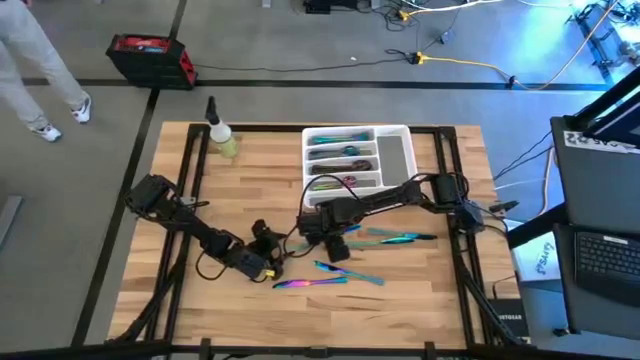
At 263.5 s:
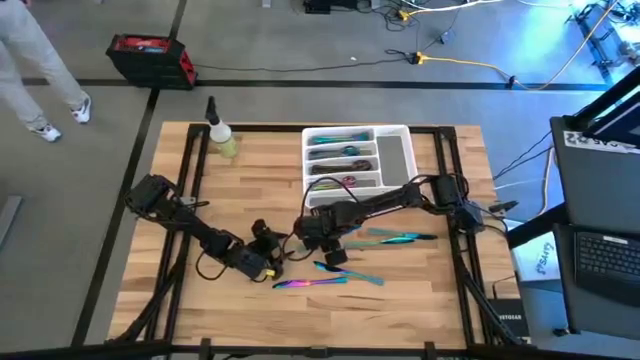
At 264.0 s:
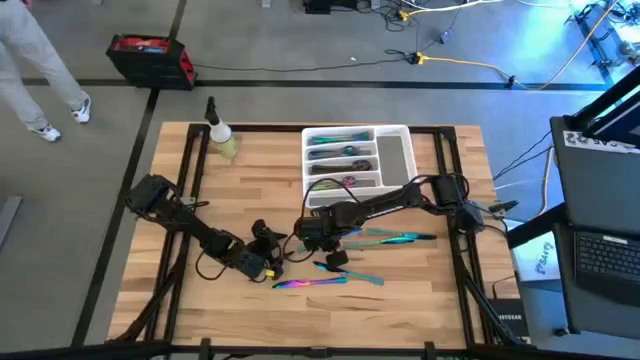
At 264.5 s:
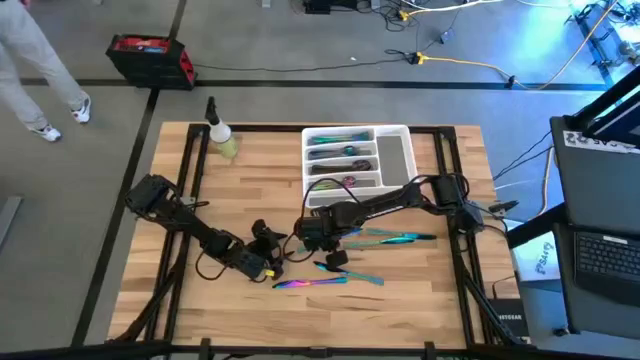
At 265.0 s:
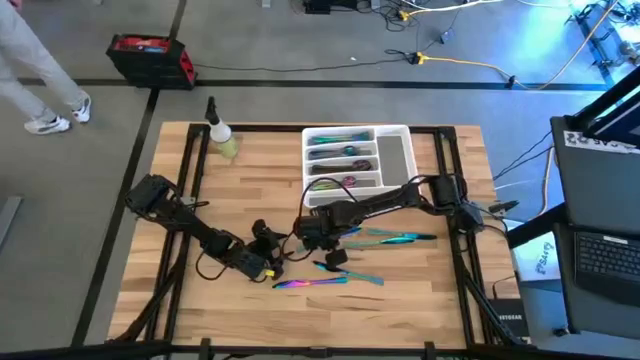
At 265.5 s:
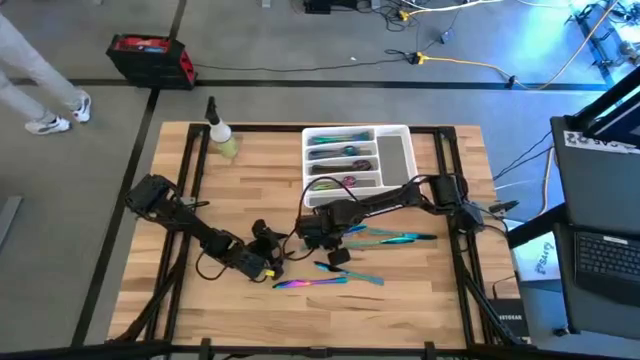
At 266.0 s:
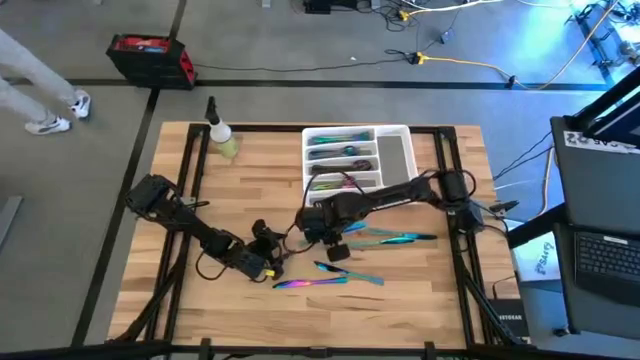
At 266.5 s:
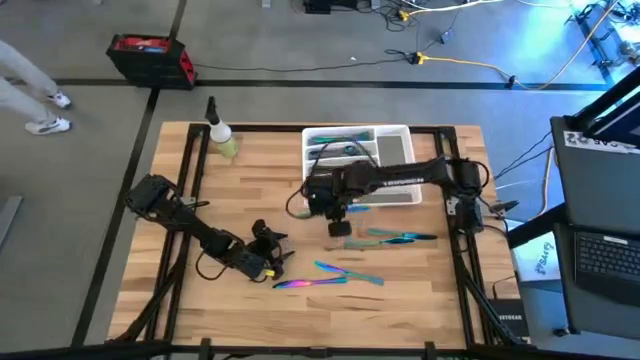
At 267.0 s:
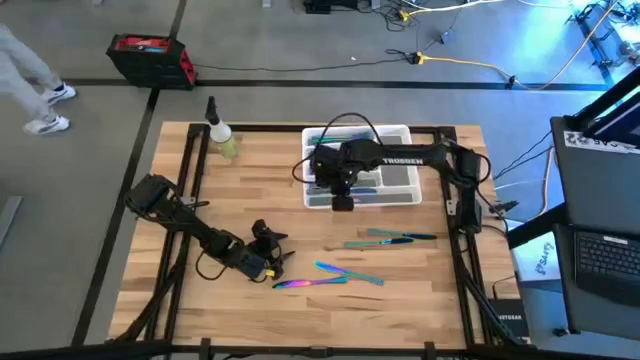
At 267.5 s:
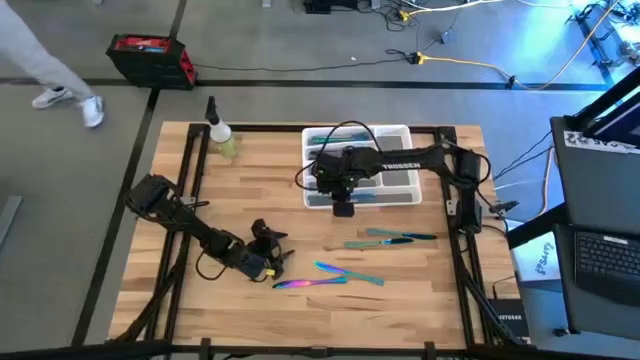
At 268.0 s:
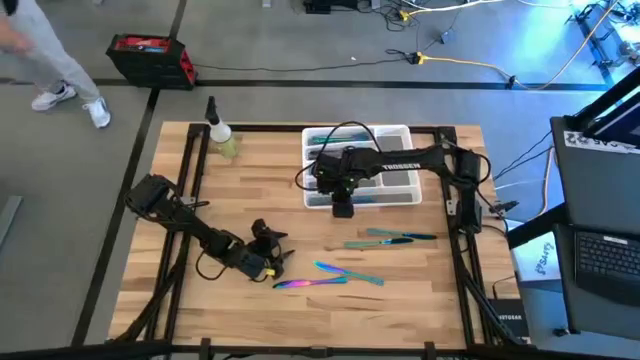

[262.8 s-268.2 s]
Task: Sort silverware
Put the blue knife on the white silverware tray

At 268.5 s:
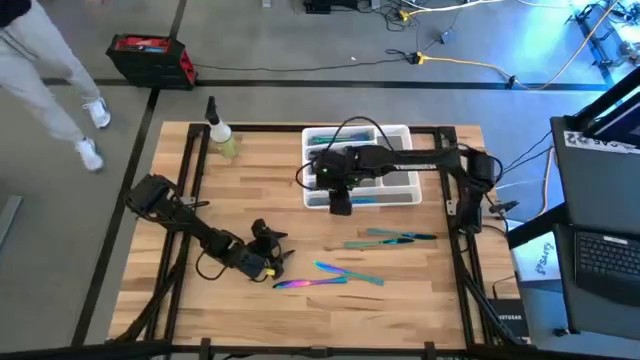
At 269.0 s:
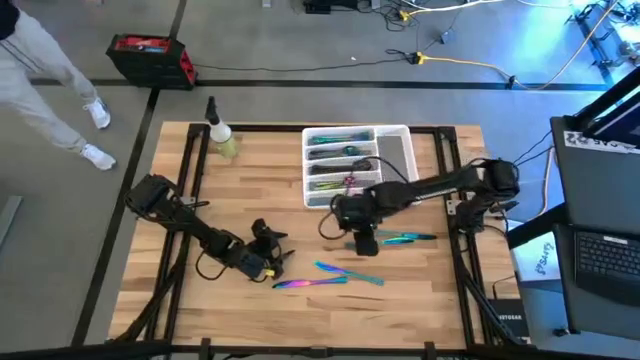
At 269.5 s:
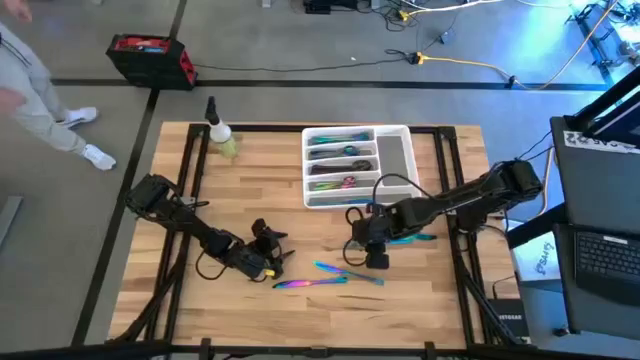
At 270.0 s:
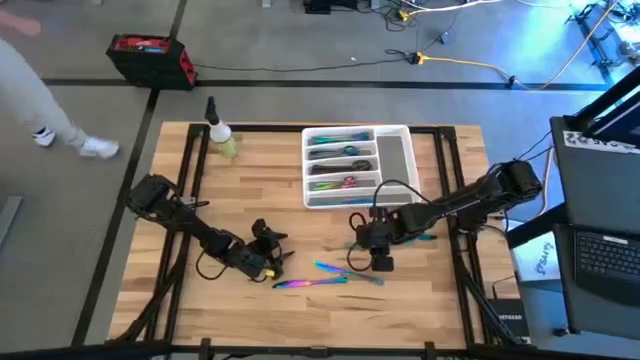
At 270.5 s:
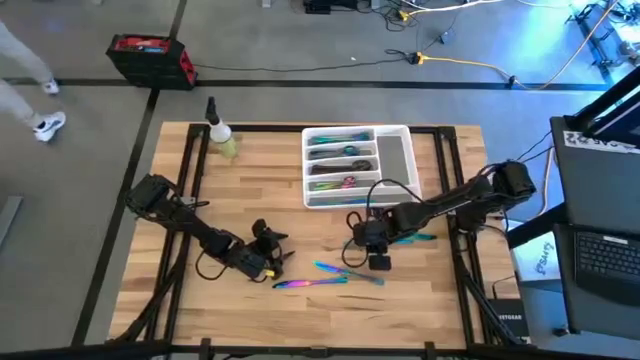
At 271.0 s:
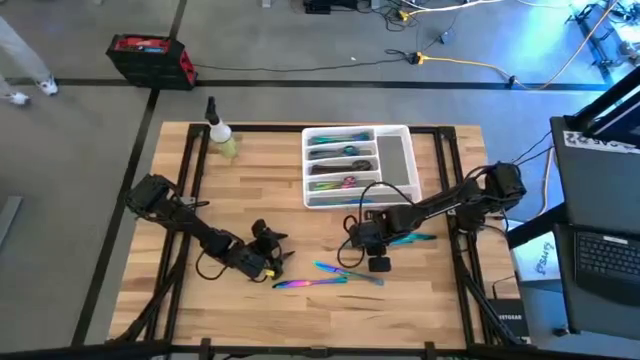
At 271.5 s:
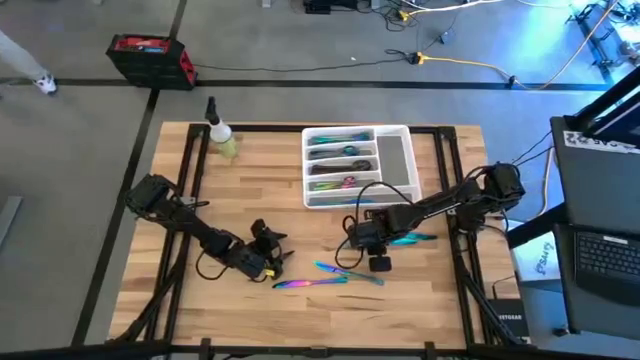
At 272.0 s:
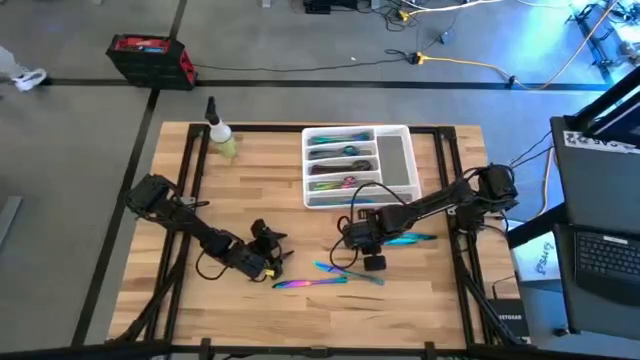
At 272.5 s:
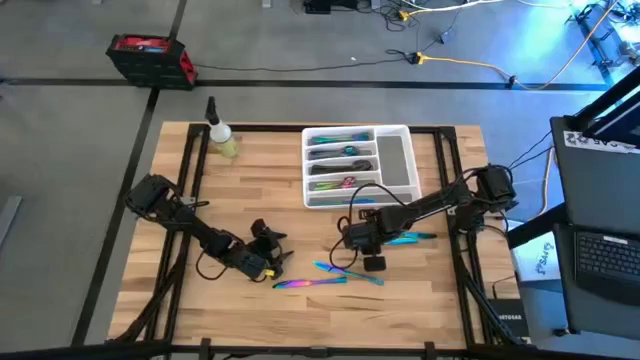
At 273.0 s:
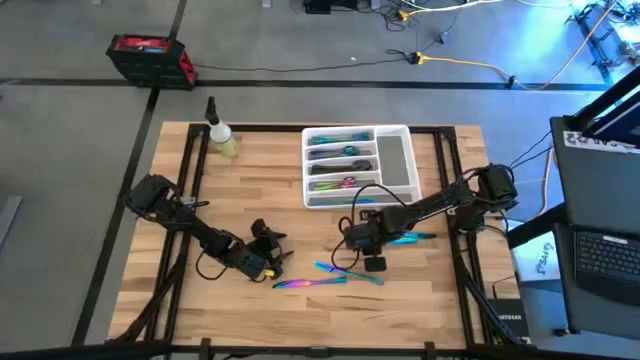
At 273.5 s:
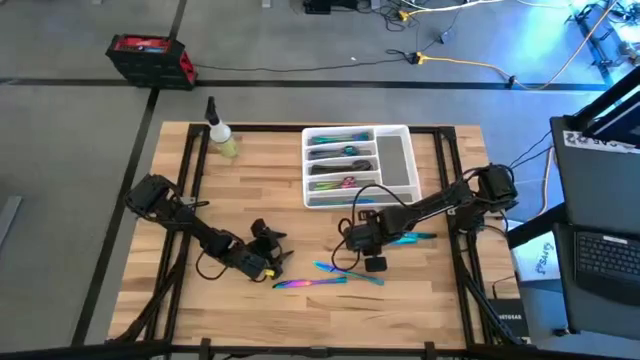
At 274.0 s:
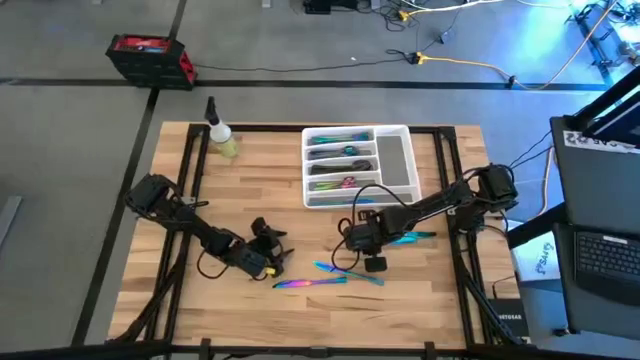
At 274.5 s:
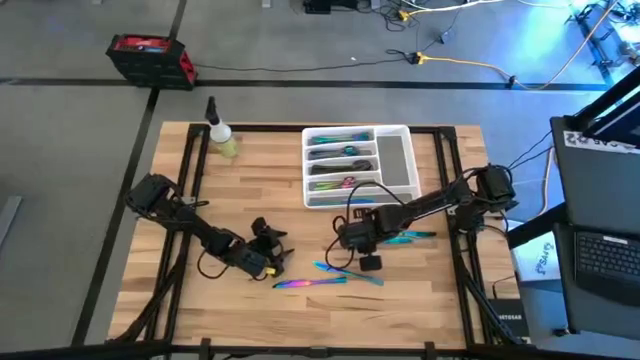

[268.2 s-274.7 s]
Put the blue knife on the white silverware tray

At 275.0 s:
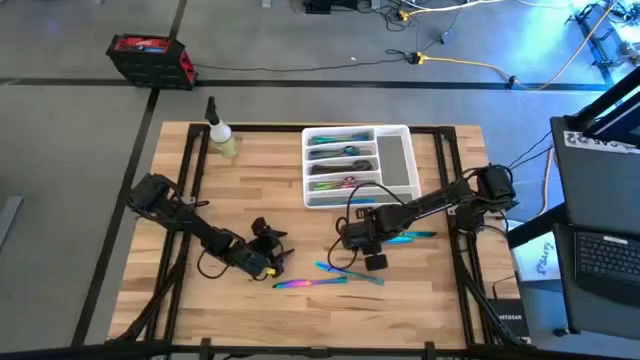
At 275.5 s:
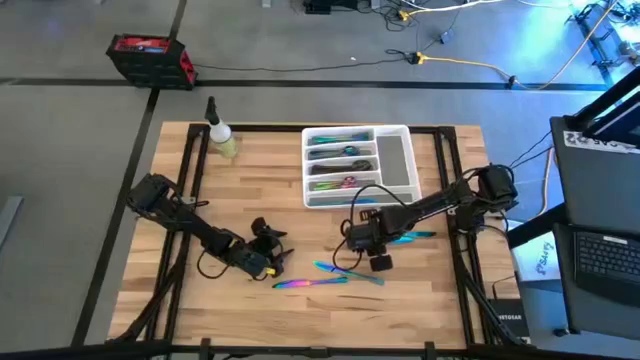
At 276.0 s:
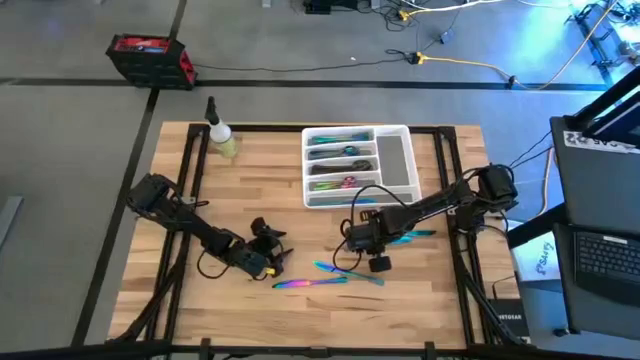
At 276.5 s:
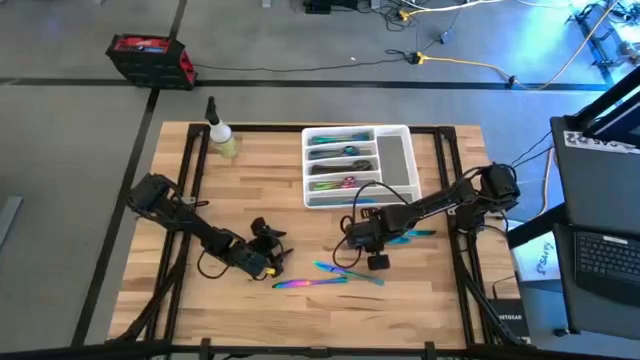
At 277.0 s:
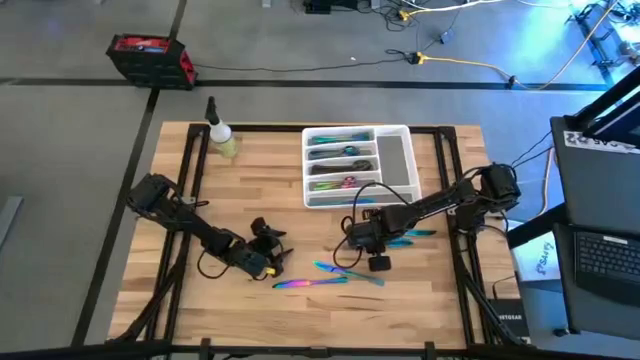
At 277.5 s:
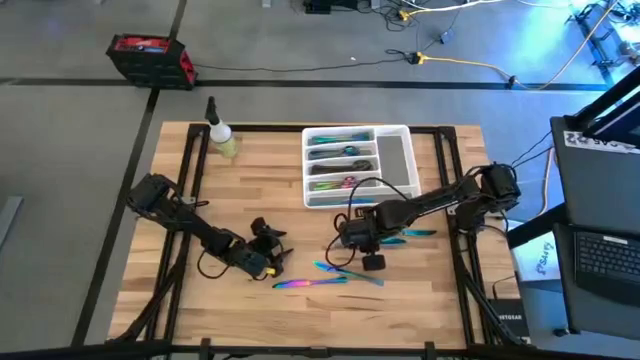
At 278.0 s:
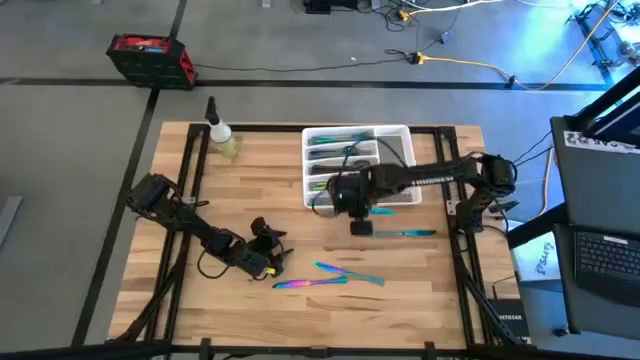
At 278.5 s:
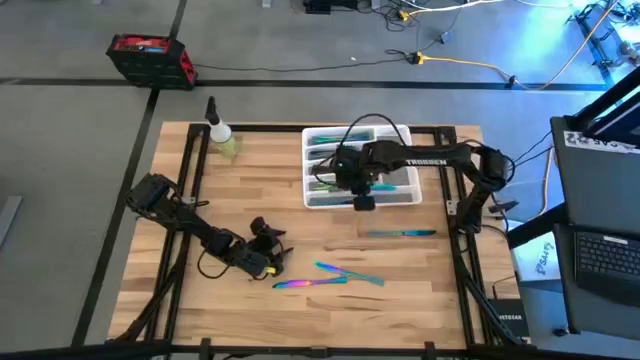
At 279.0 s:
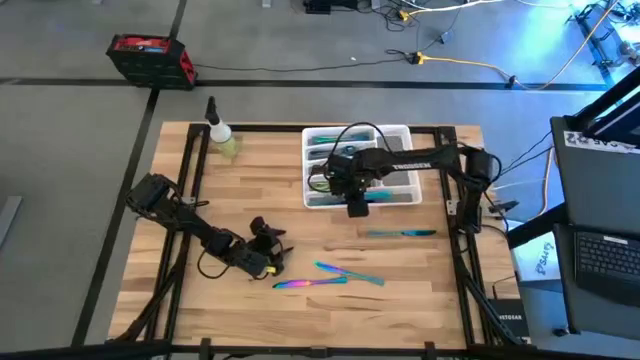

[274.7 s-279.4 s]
Put the blue knife on the white silverware tray

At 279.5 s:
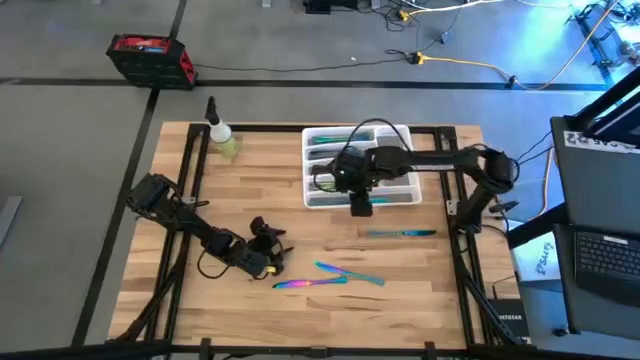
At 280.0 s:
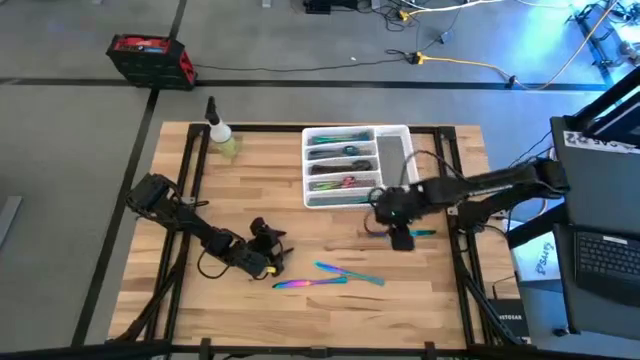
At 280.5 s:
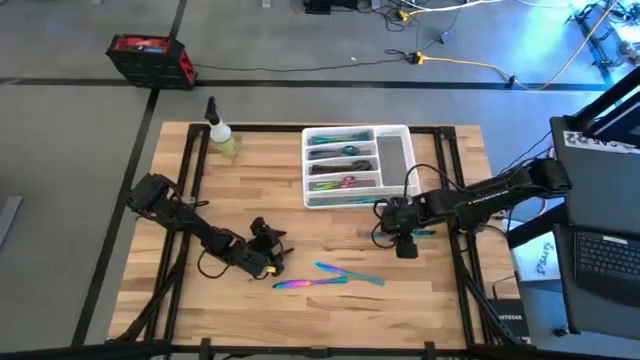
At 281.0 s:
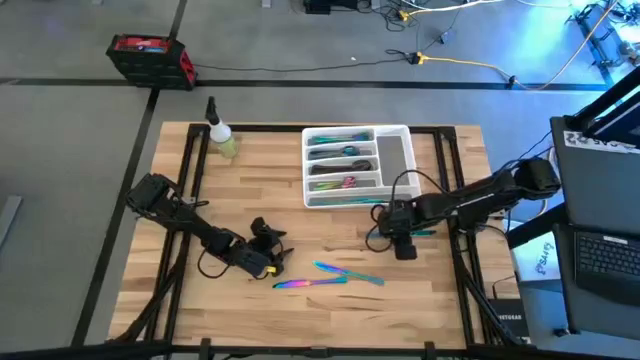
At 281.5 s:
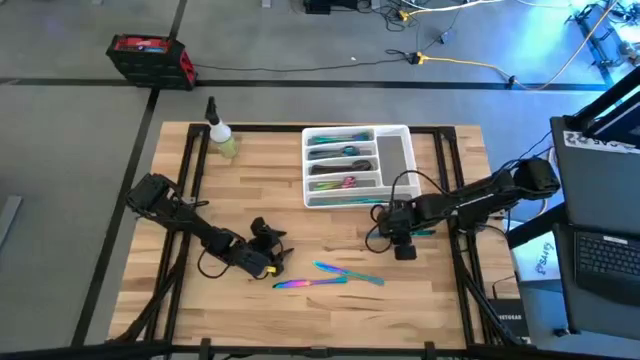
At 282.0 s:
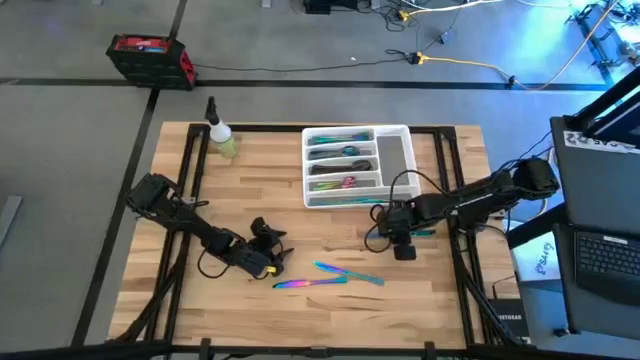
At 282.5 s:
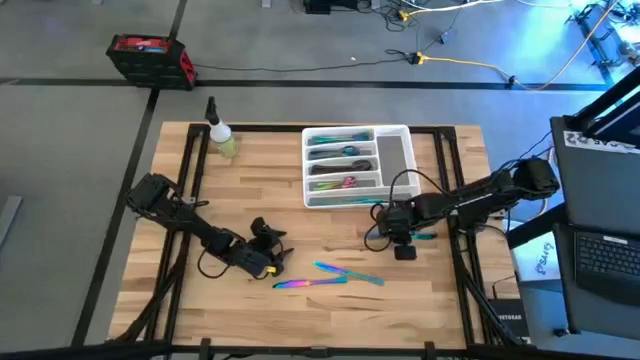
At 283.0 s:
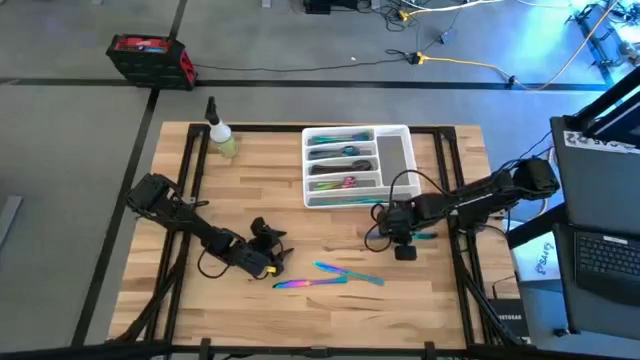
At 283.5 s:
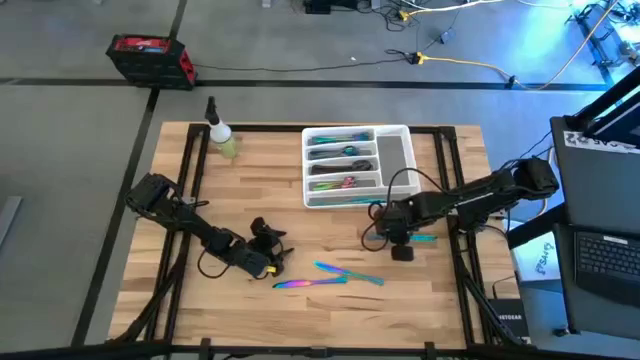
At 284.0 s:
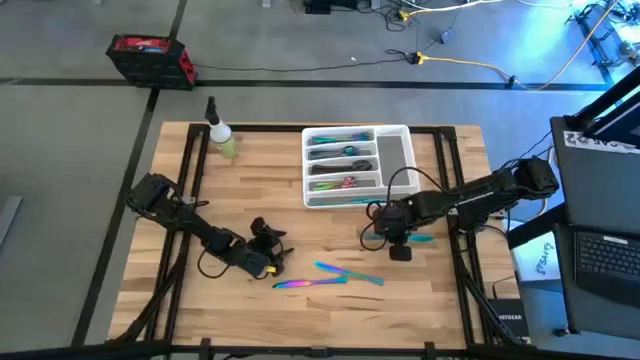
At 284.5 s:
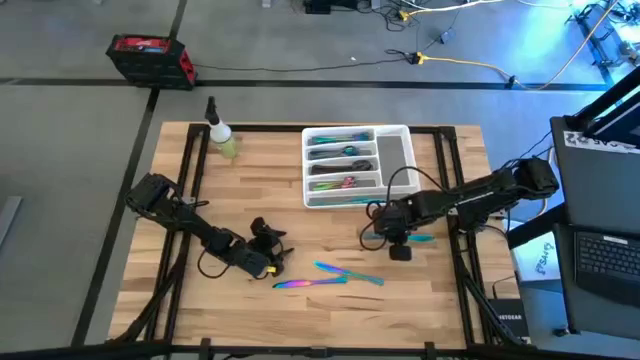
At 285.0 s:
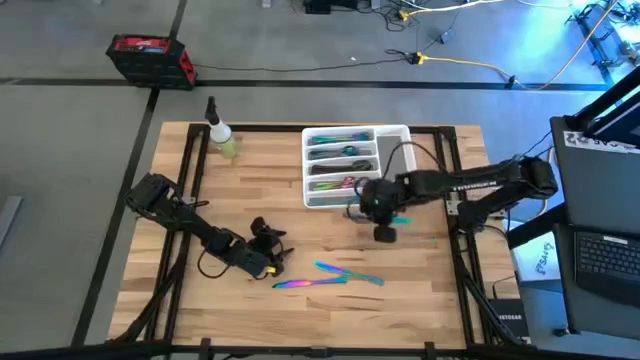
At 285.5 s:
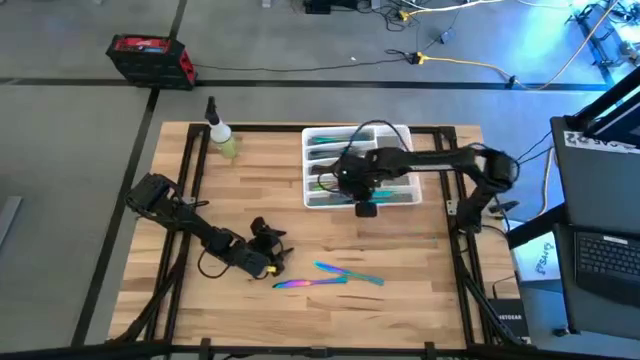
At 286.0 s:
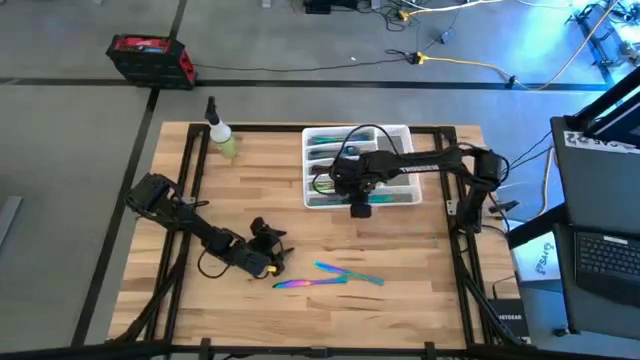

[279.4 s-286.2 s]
Put the blue knife on the white silverware tray
